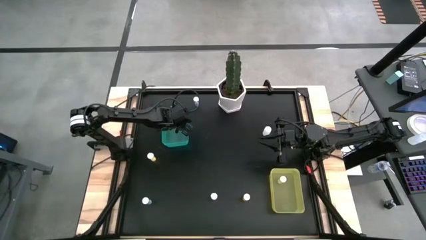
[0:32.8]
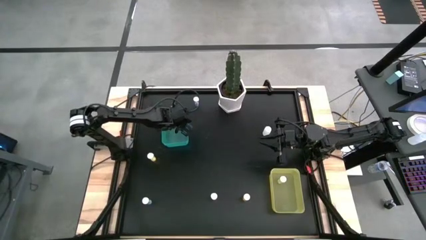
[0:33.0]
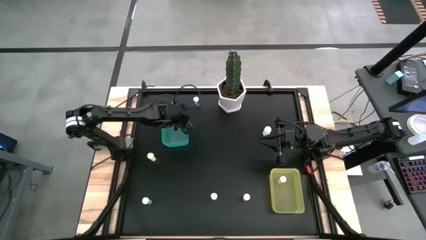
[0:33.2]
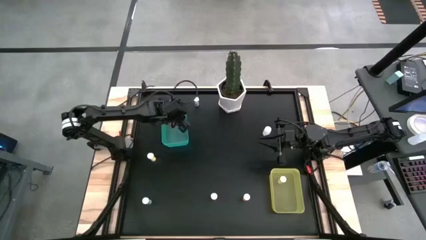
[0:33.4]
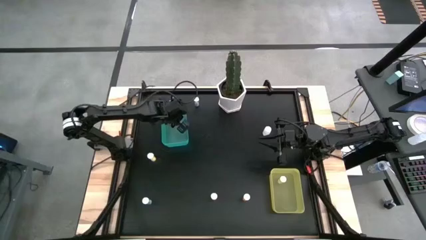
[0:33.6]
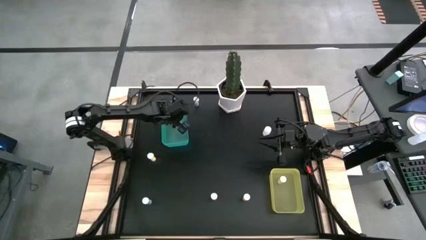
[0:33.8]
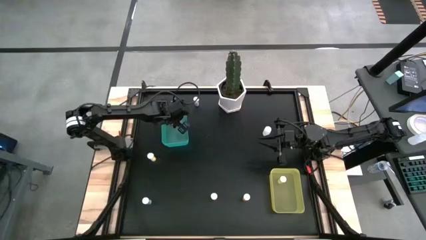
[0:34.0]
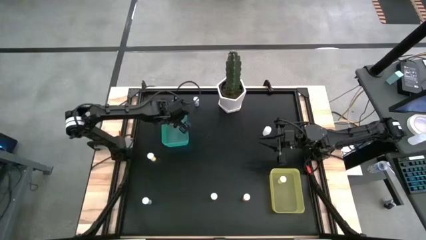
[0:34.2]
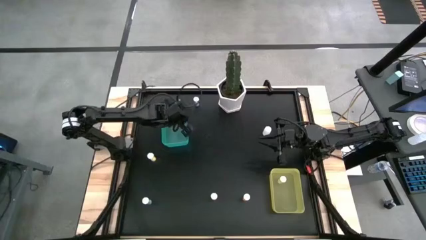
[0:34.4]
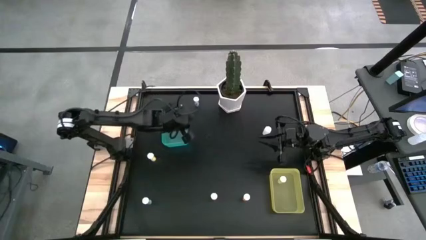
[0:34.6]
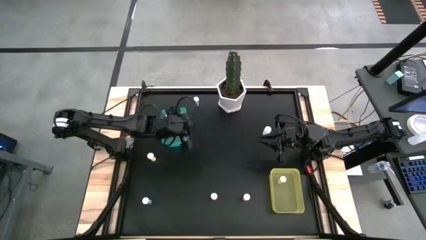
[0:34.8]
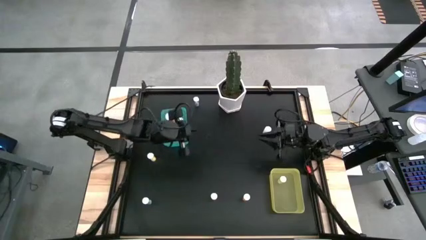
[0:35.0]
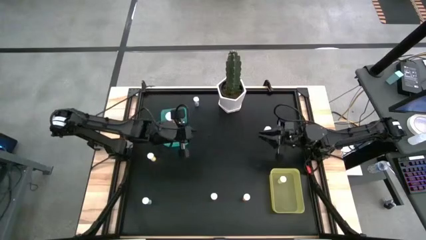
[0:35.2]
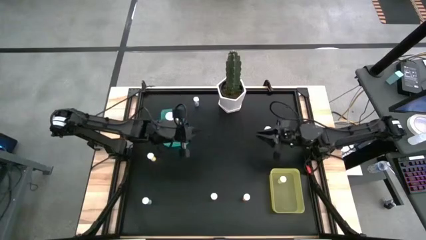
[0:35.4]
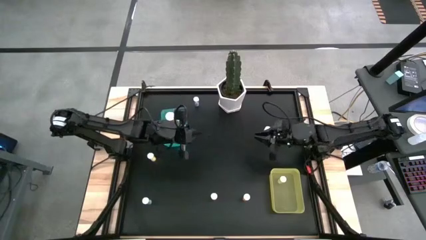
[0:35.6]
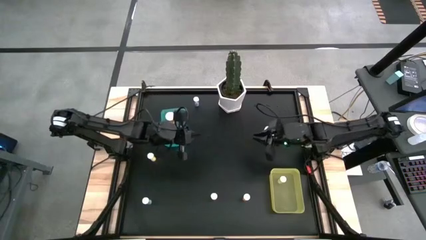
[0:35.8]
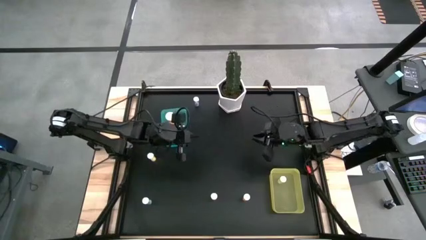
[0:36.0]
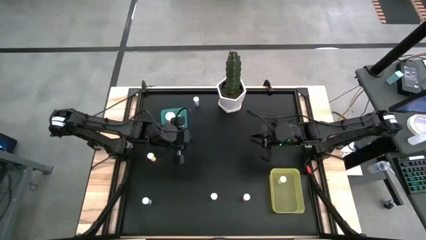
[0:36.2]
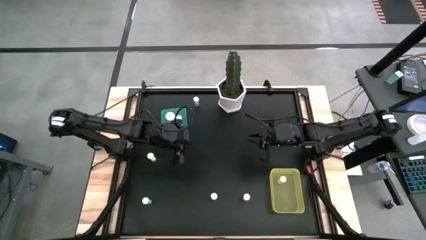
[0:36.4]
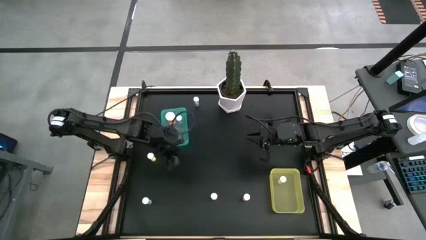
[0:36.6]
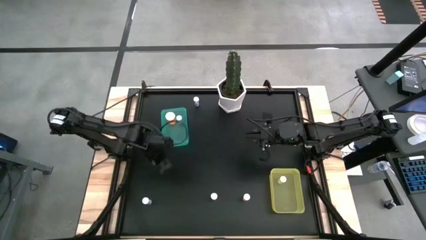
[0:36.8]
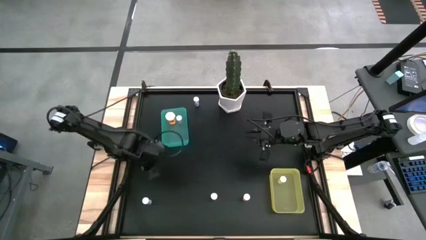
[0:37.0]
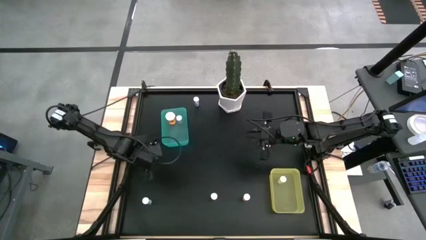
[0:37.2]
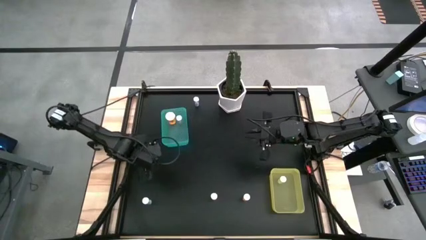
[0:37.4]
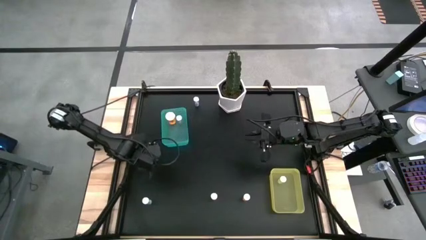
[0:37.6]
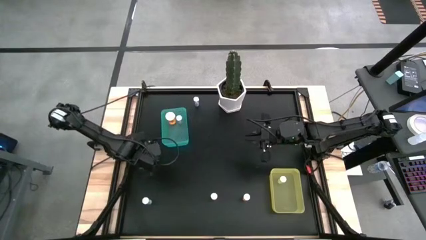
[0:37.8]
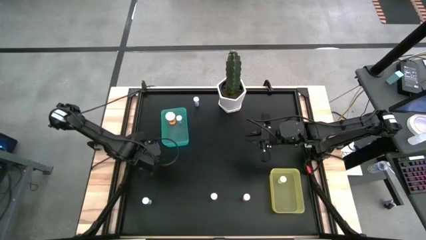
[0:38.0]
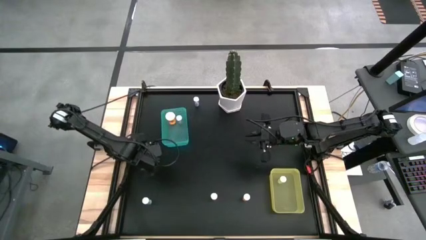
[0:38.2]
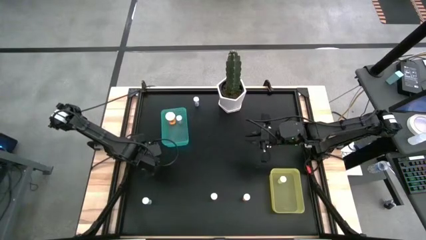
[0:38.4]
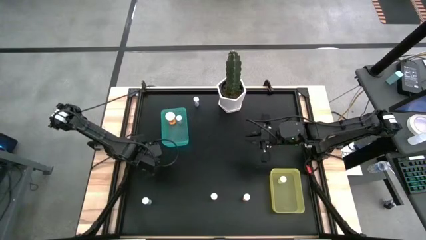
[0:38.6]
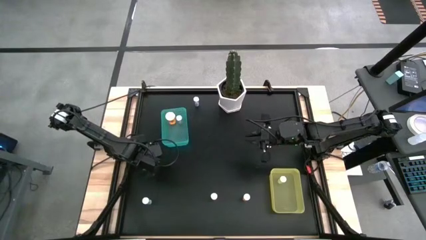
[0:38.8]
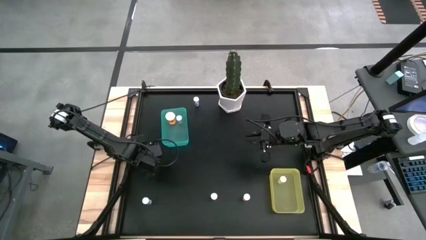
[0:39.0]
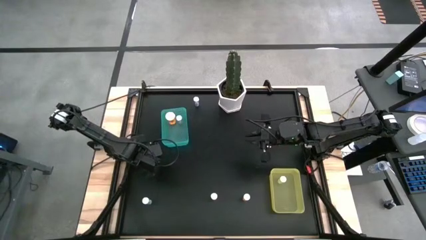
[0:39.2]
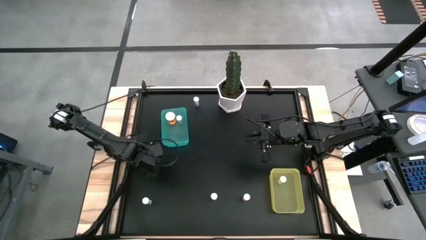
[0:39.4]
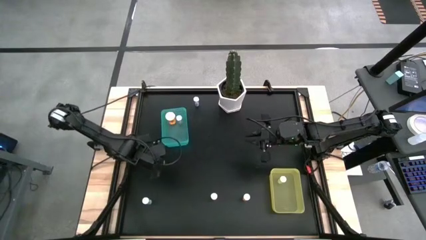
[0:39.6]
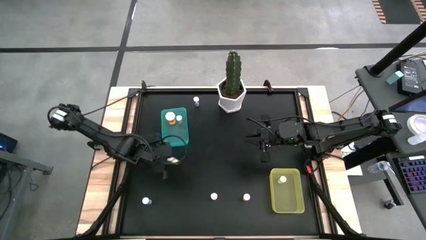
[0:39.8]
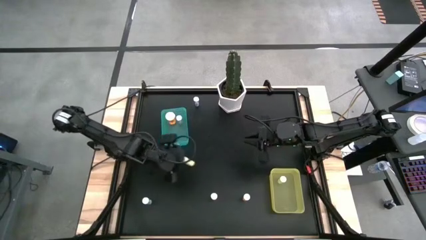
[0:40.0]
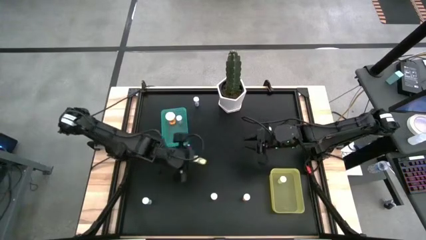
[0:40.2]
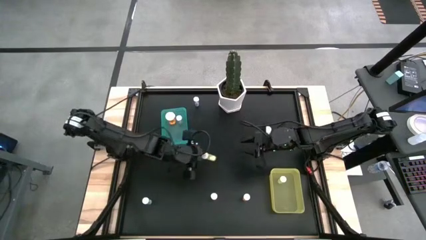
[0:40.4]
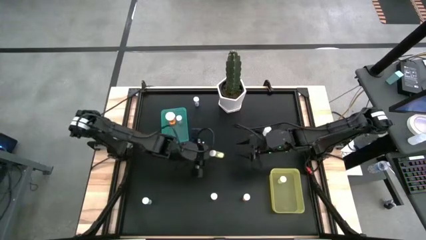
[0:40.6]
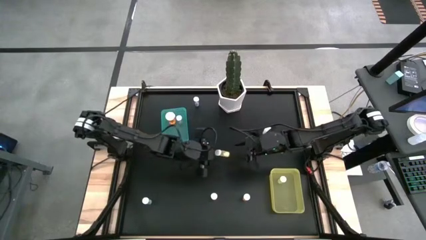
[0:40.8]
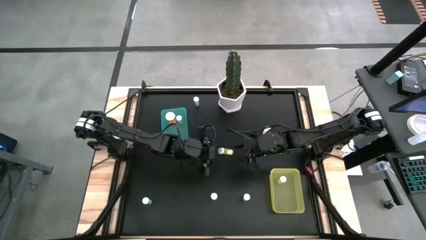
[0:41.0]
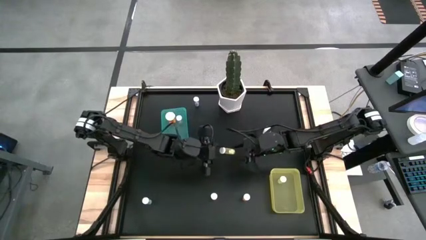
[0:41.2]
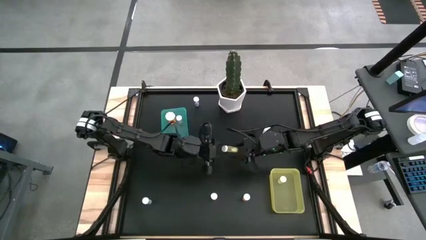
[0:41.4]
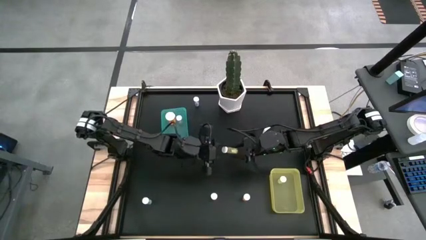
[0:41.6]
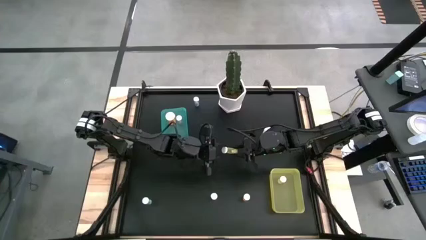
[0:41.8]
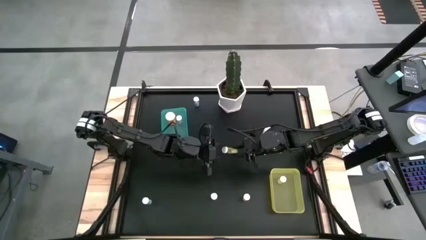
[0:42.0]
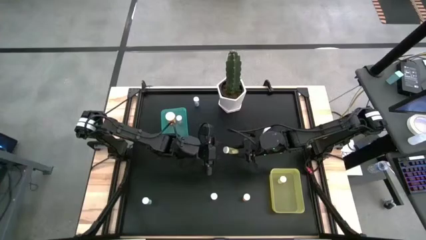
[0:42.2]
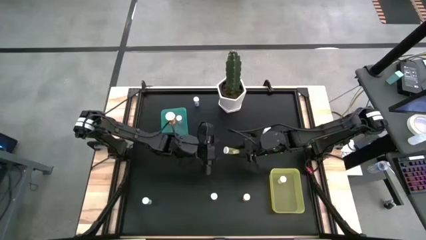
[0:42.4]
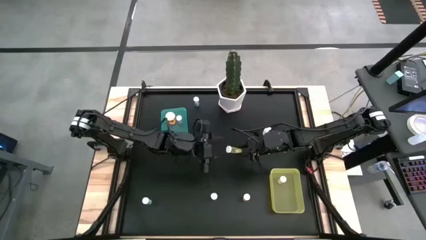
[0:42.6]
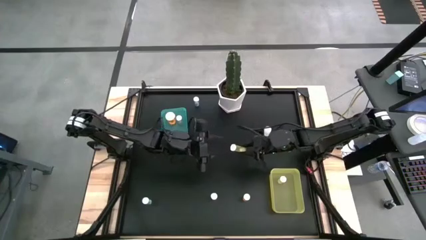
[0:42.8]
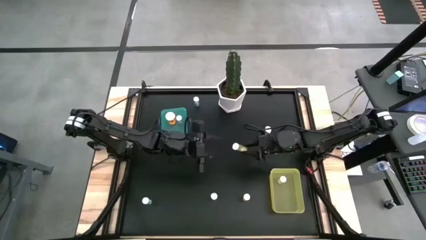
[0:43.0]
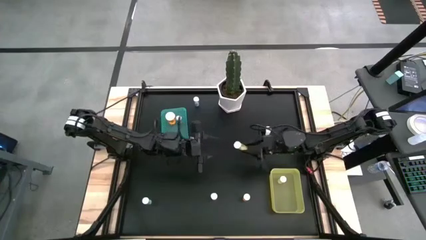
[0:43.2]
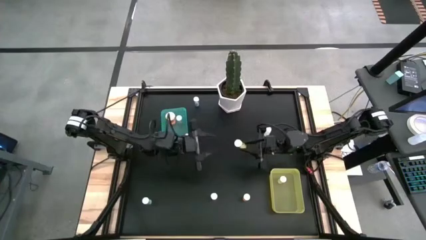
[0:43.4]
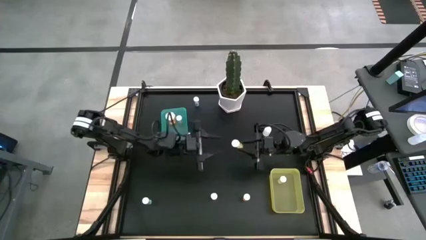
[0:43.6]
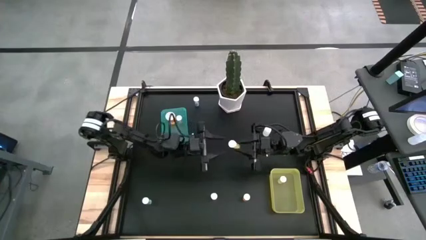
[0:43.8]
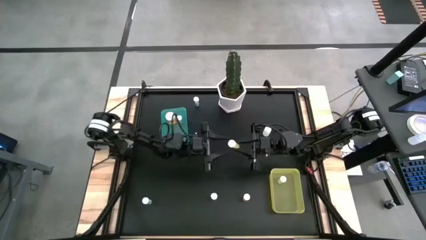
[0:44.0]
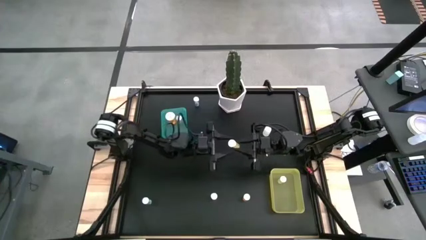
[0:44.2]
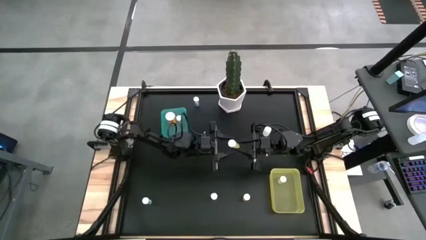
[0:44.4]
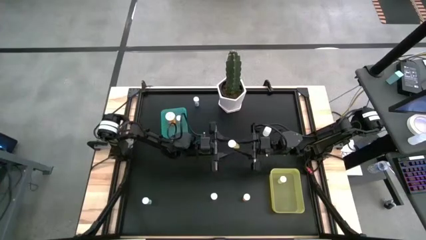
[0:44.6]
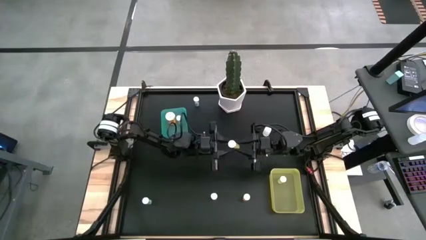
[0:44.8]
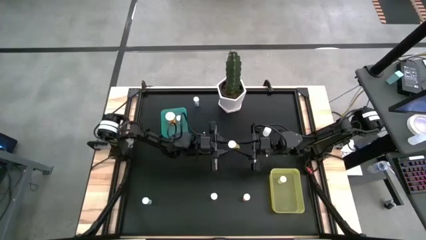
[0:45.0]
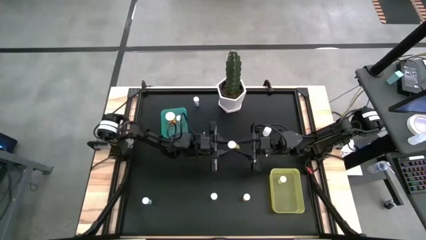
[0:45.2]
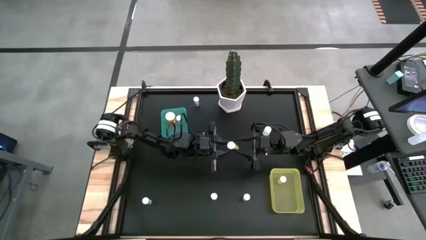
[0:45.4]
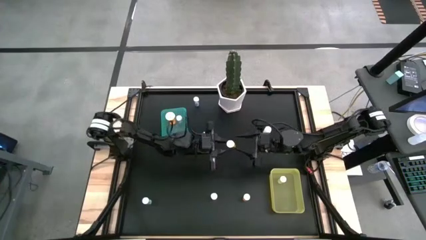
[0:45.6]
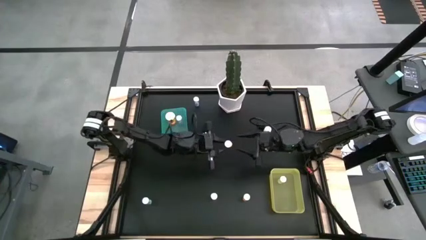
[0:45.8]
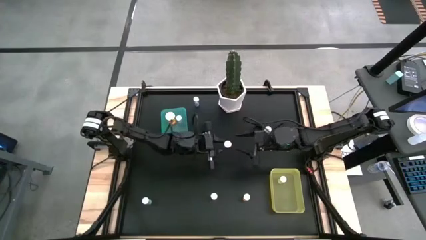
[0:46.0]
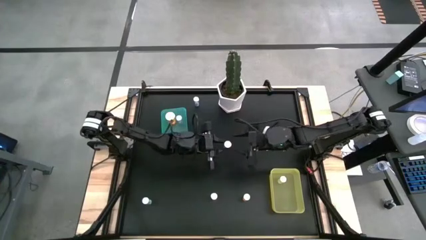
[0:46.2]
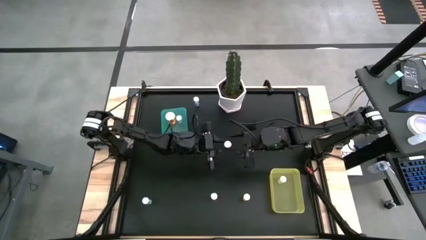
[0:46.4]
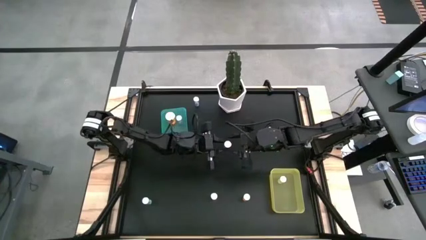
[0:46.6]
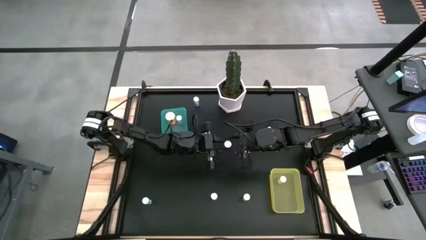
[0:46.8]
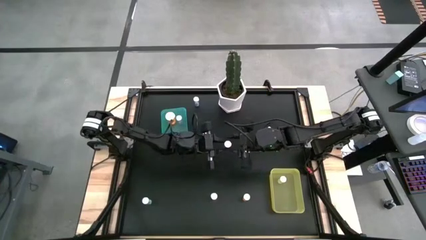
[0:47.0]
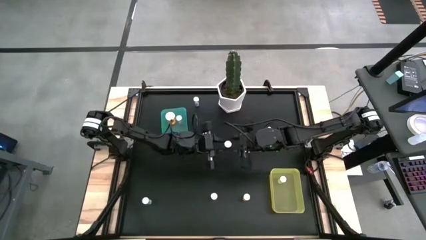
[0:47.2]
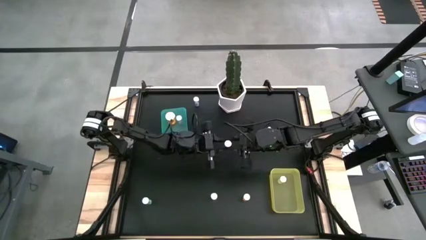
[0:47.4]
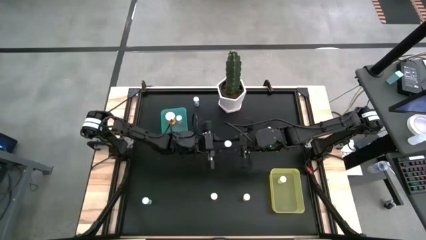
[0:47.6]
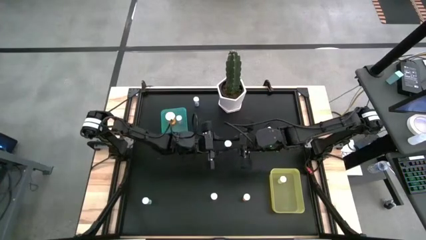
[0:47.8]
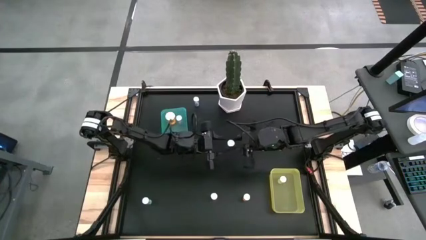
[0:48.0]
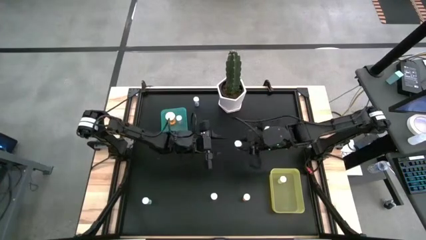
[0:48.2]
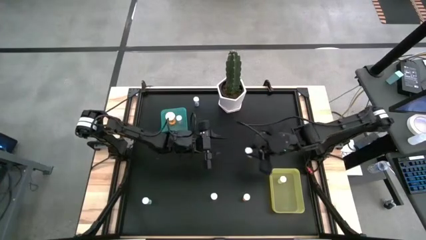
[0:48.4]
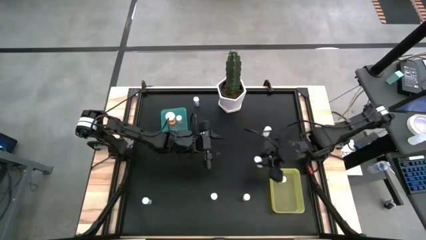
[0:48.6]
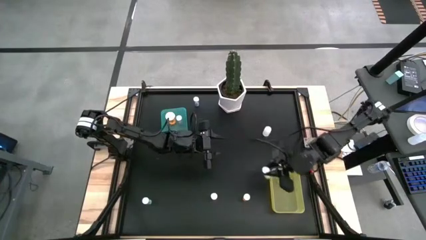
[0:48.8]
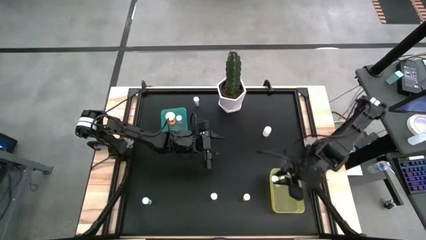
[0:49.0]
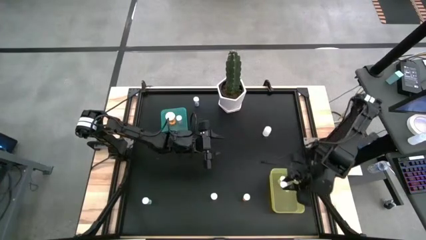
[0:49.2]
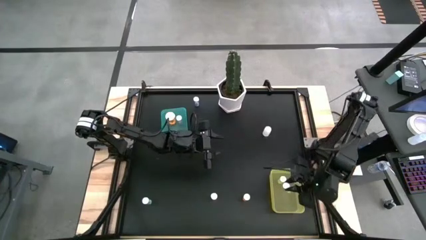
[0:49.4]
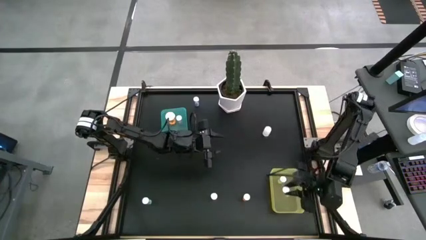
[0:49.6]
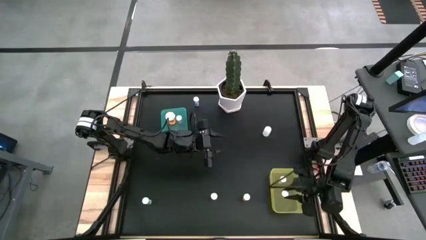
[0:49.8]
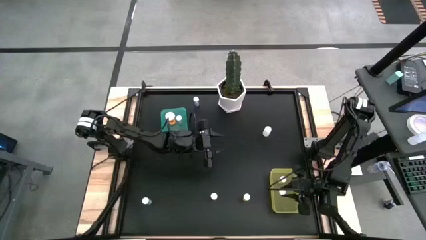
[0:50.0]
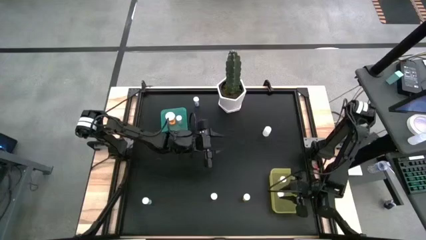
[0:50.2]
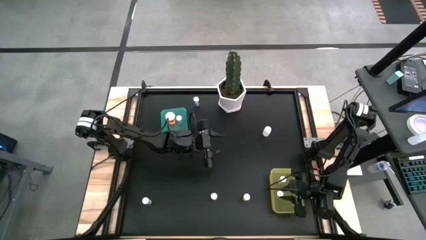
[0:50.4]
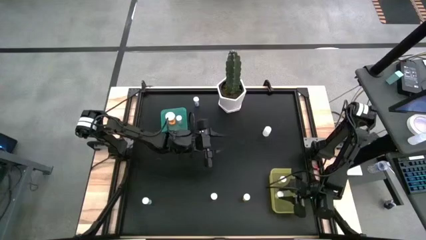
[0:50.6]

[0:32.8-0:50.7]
Task: Pick and place medicine bottles into bin by pill shape (circle, oval)
Put the yellow tablet bottle into the yellow bin
